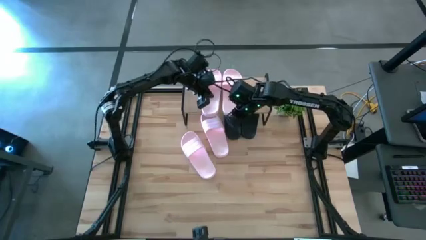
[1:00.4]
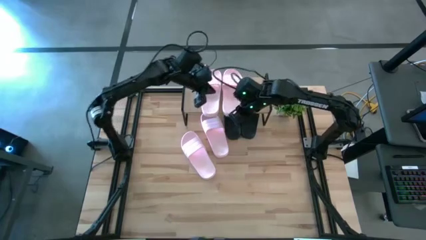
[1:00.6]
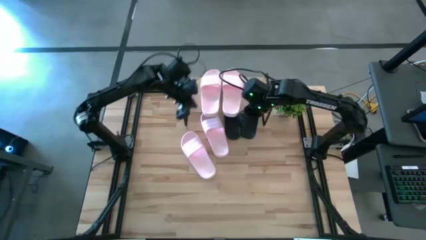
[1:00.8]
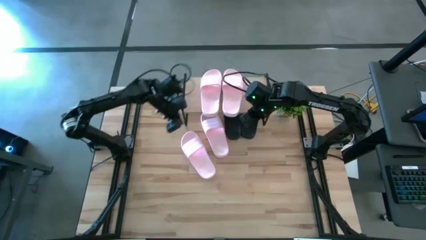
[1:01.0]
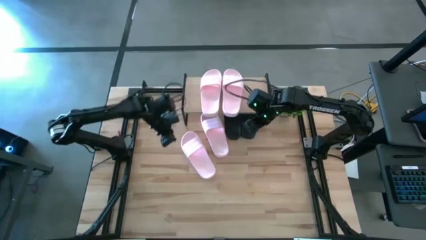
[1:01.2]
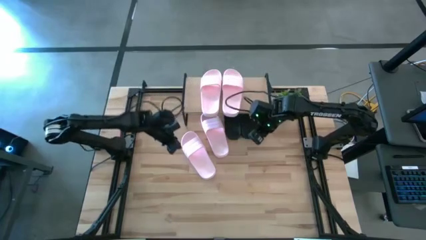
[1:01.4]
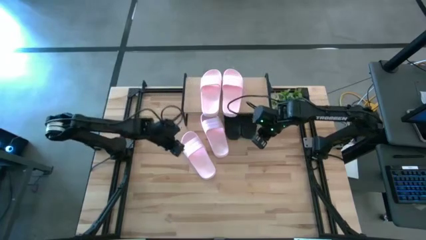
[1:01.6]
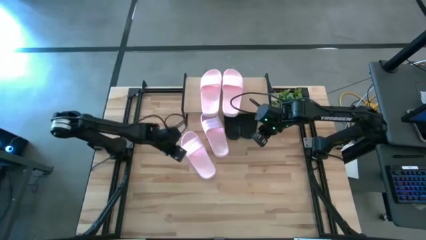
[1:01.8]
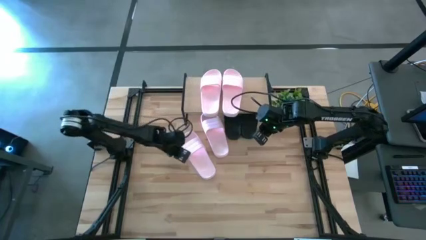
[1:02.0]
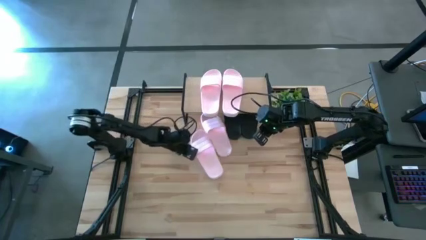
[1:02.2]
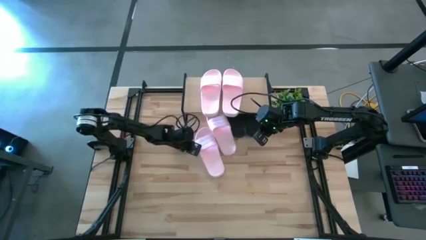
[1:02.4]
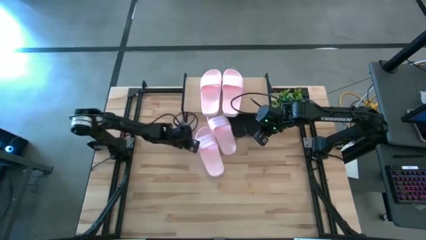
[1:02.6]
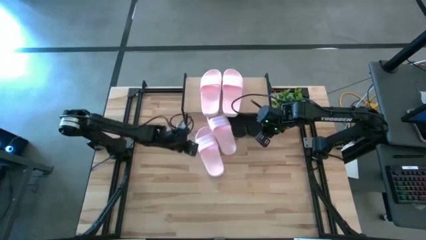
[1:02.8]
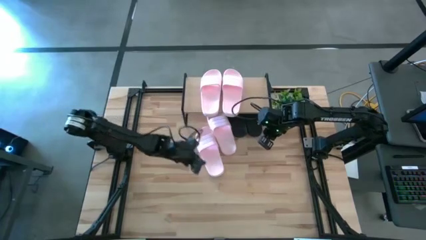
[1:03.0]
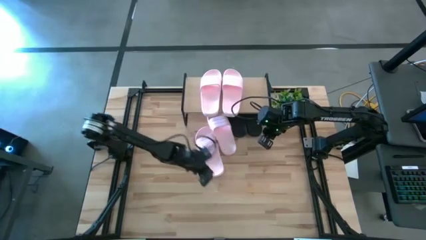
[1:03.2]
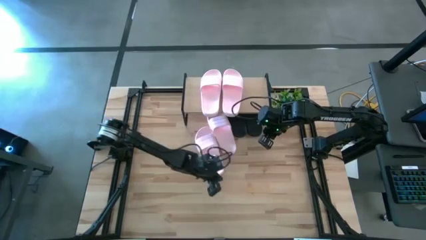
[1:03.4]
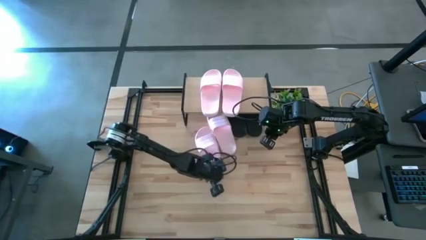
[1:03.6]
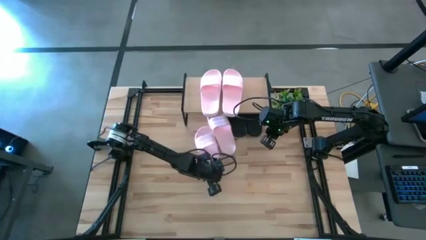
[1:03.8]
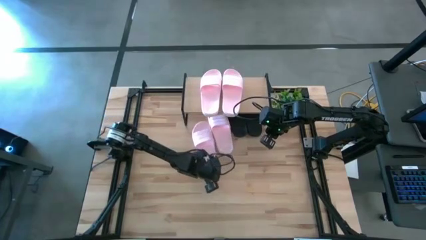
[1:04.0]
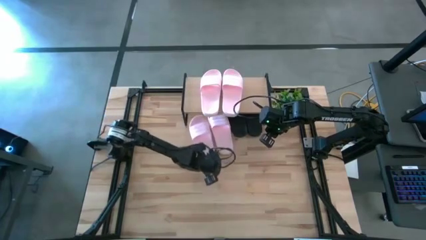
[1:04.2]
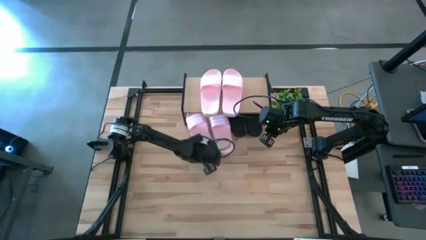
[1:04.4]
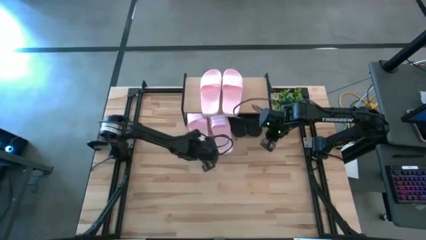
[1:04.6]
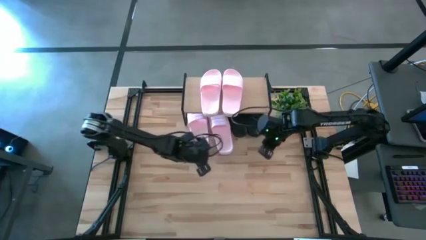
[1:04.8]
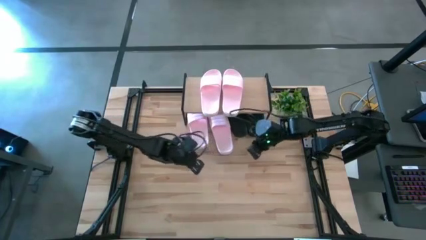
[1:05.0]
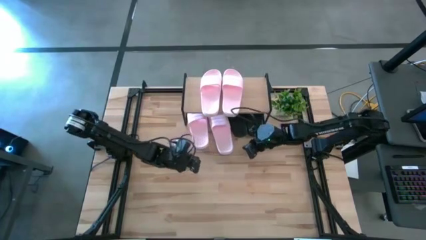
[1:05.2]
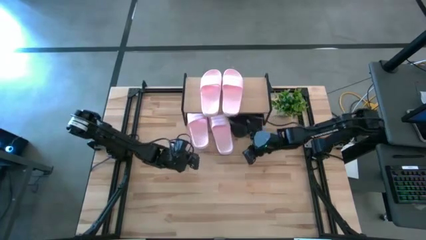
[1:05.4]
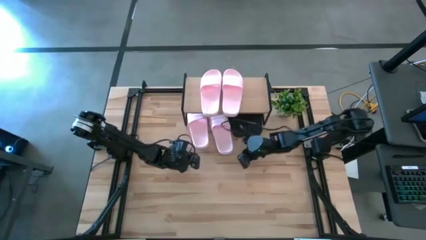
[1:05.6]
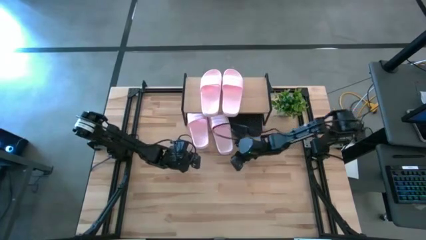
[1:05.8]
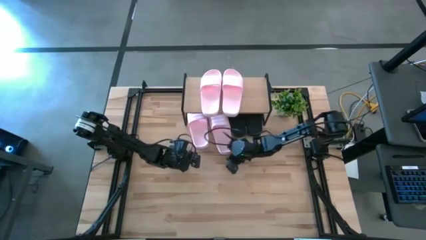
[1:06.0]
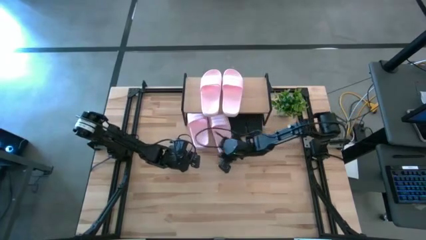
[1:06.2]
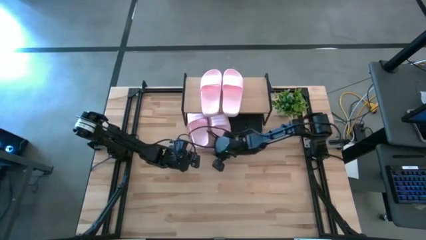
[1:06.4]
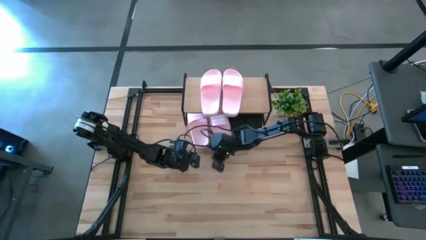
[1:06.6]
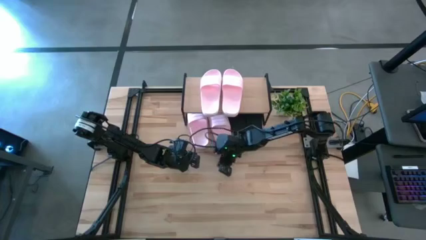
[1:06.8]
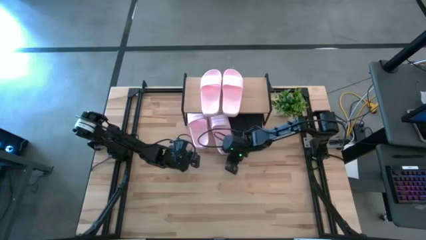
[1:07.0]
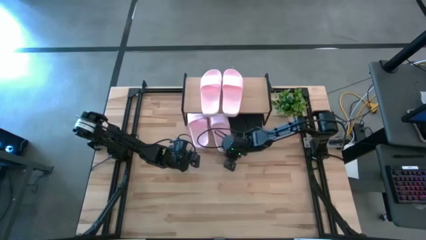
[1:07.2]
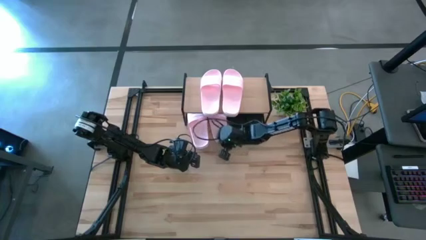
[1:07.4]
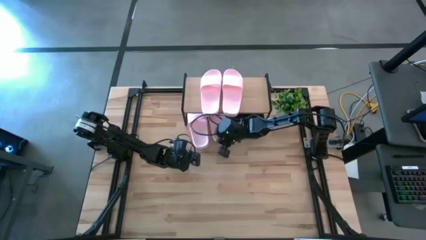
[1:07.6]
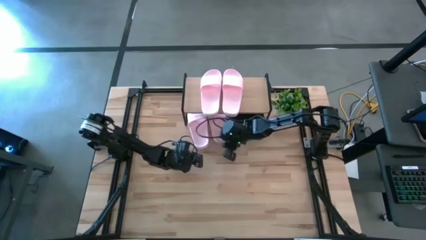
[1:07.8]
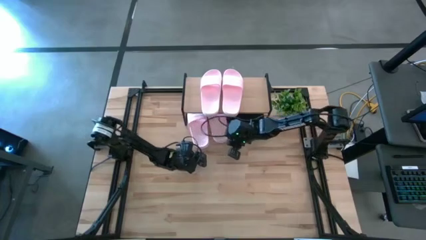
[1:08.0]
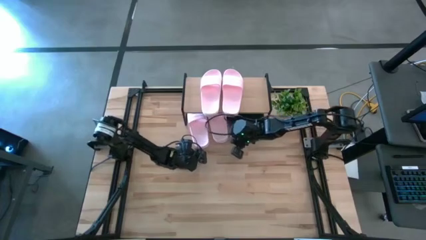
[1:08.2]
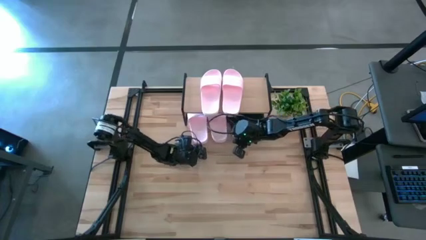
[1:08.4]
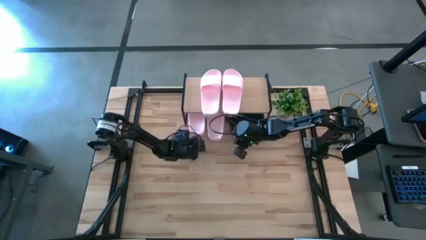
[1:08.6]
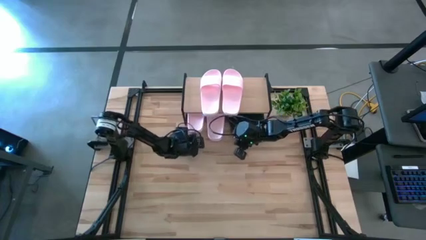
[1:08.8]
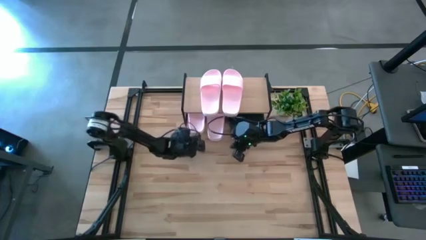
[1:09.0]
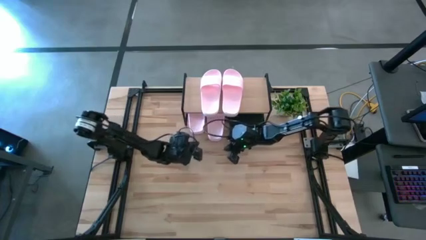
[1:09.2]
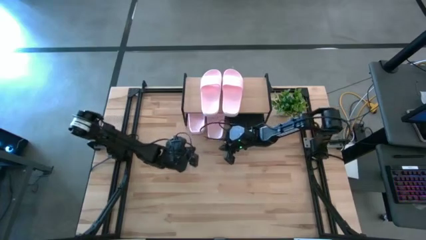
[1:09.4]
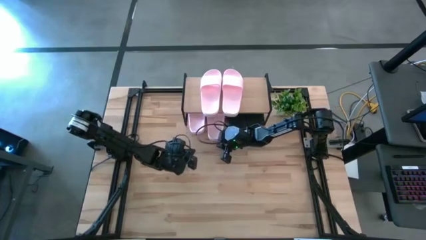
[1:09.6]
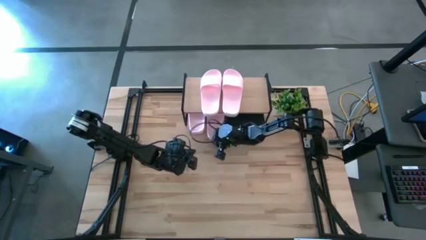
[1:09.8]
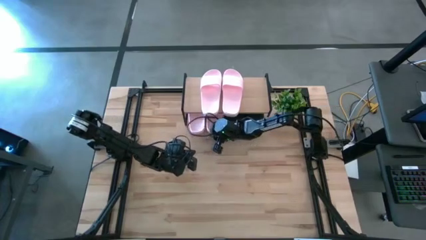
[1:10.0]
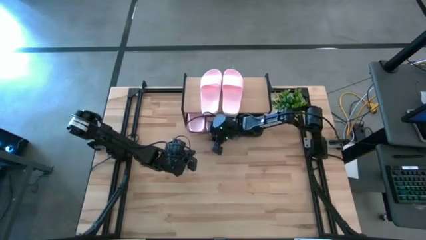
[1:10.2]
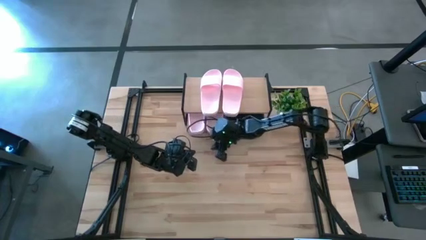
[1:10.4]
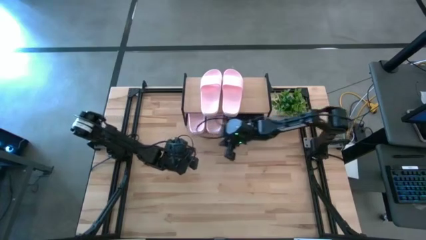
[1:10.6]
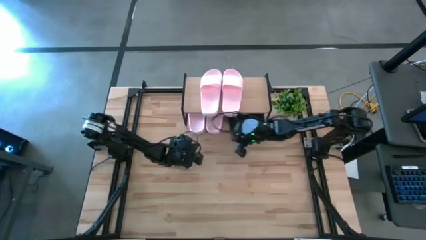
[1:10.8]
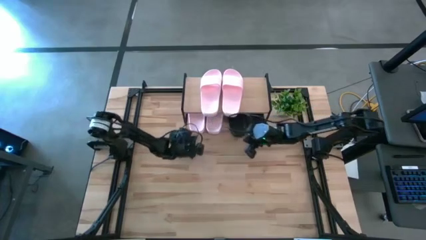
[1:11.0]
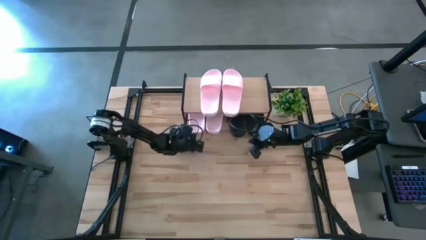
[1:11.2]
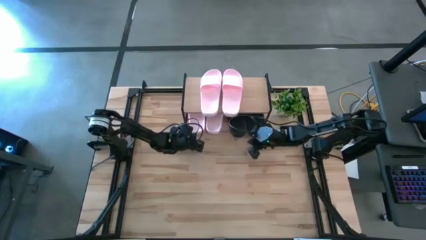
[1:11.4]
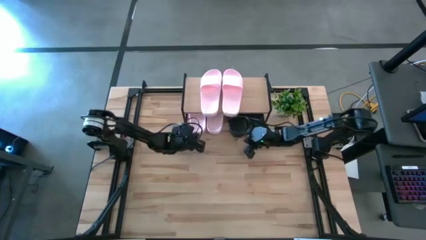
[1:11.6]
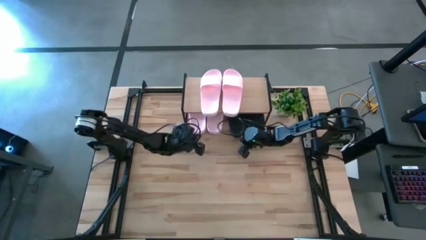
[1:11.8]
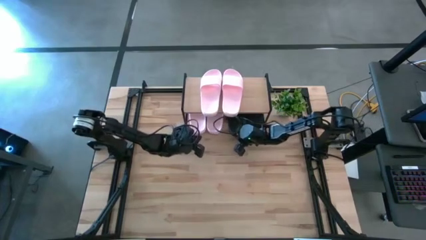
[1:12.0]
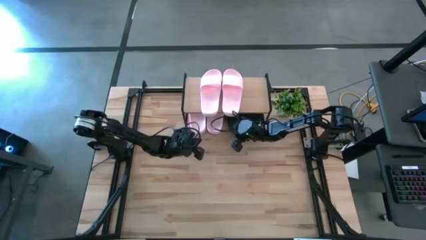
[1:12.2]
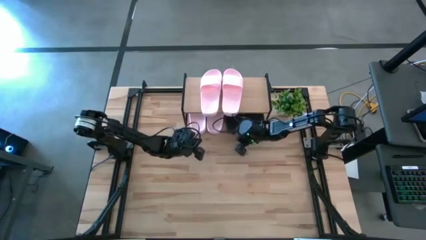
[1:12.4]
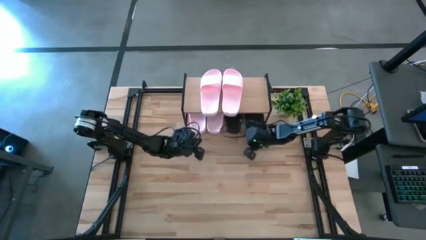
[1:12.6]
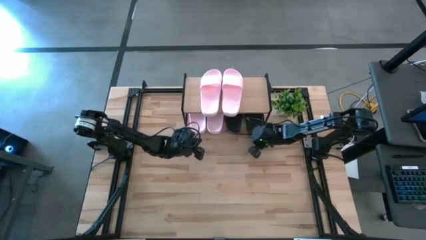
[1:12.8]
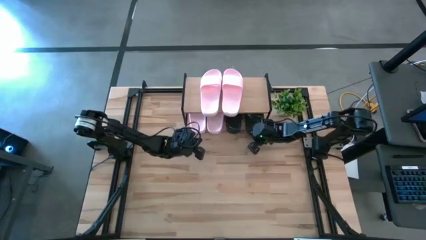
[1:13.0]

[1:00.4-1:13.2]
Task: Pick and place slides into the shelf
Adjust the slippers under the shelf

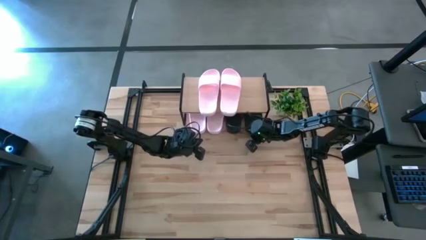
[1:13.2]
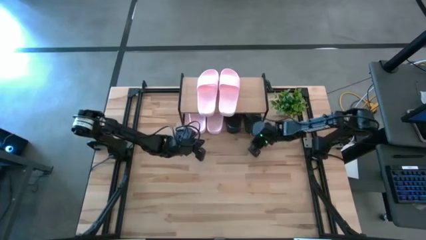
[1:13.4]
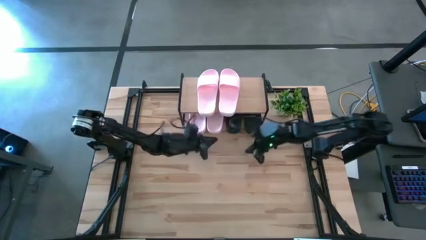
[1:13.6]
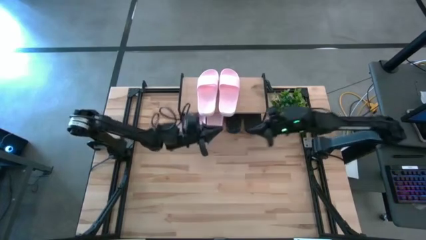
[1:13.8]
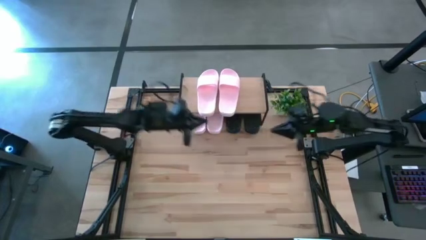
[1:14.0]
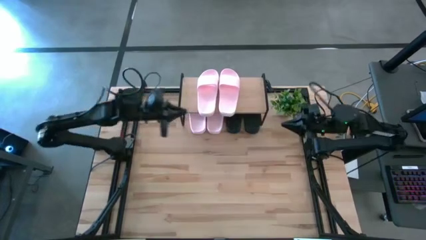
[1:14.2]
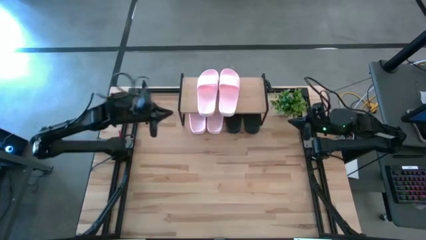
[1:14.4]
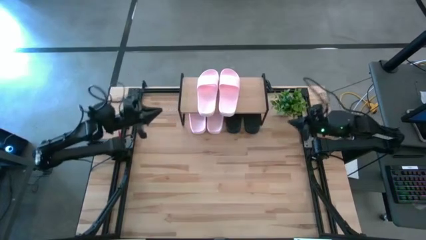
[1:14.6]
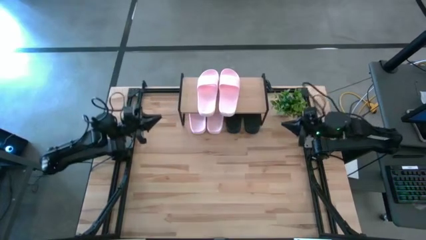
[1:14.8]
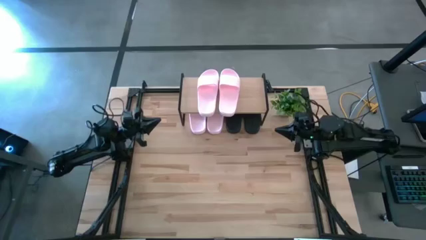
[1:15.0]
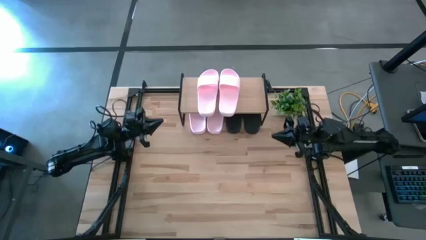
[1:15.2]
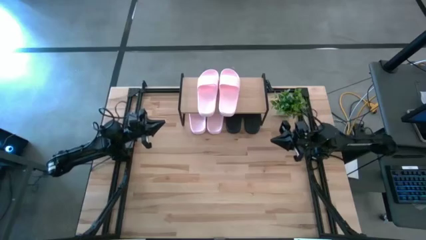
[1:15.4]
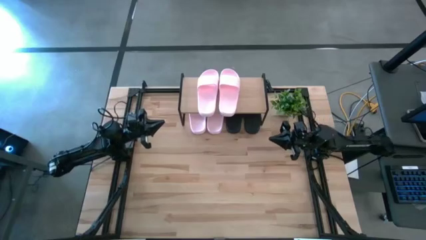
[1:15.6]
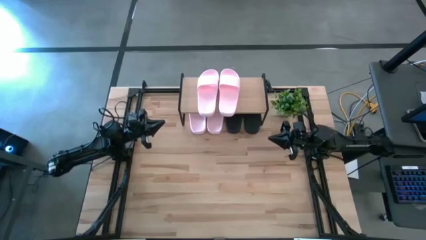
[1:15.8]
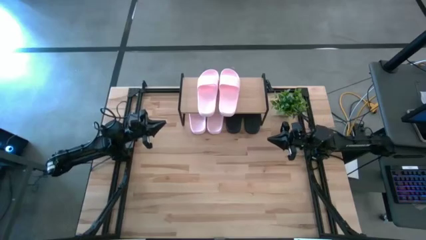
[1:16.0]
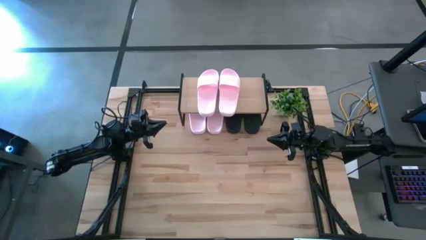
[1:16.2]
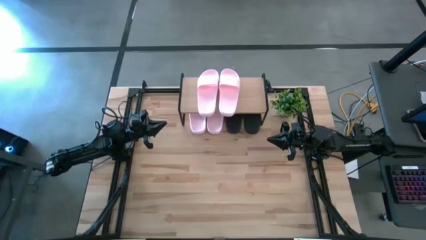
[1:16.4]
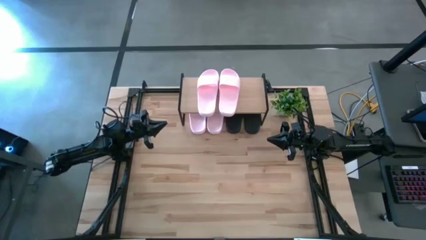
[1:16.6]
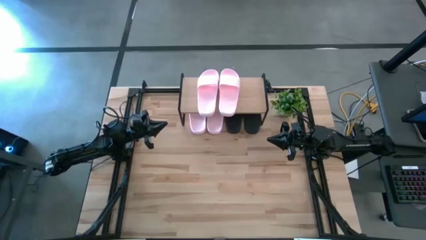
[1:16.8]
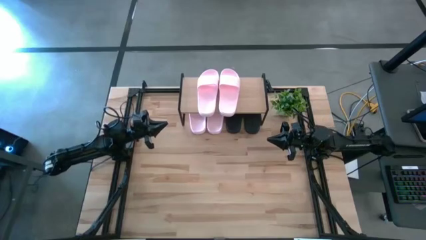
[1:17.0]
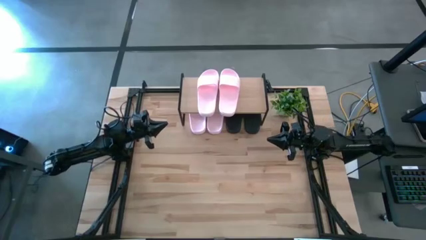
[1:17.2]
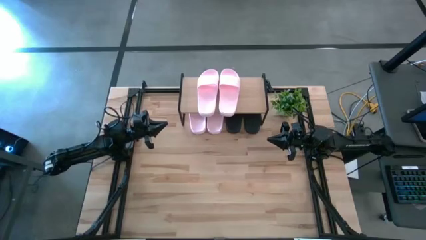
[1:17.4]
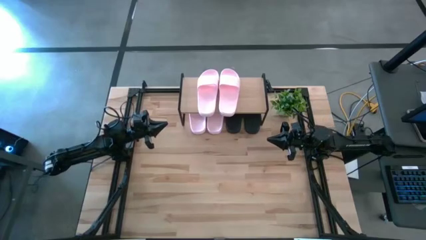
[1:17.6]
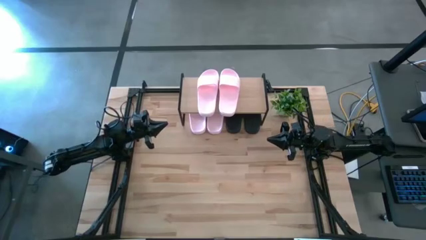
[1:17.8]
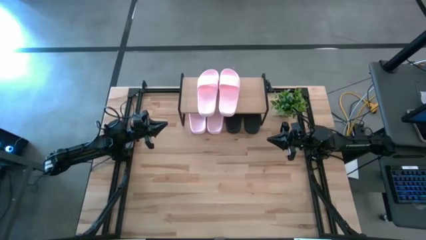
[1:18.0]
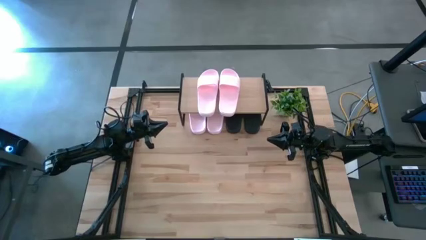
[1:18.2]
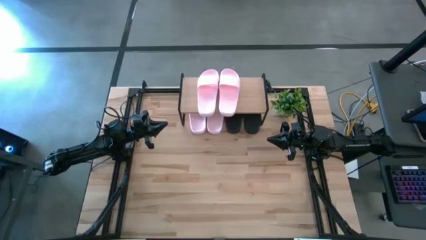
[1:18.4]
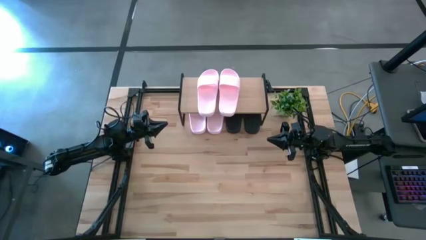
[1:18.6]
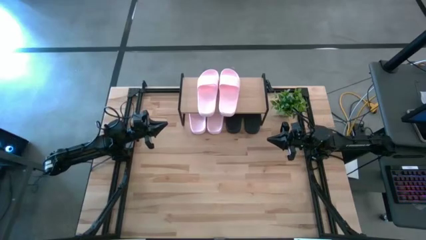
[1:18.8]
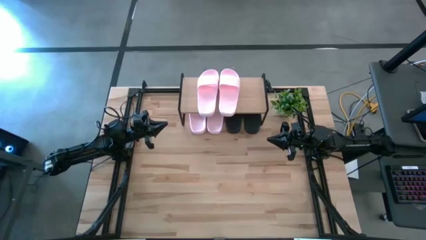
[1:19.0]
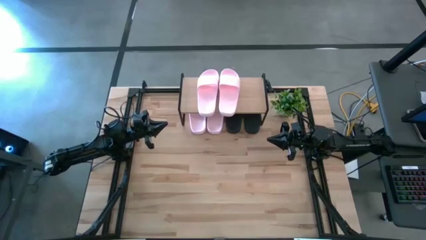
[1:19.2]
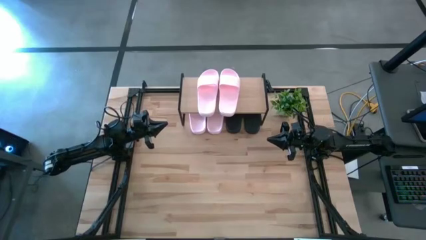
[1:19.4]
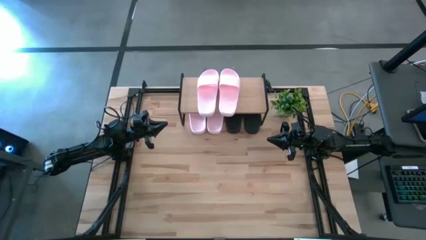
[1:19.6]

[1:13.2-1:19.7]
Return to Home Position
